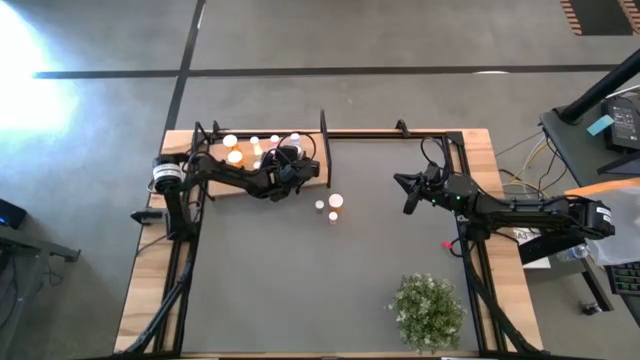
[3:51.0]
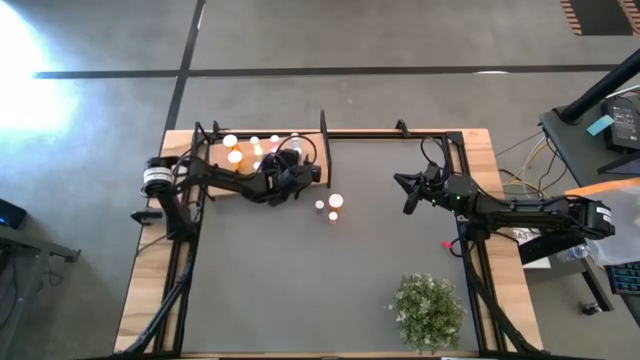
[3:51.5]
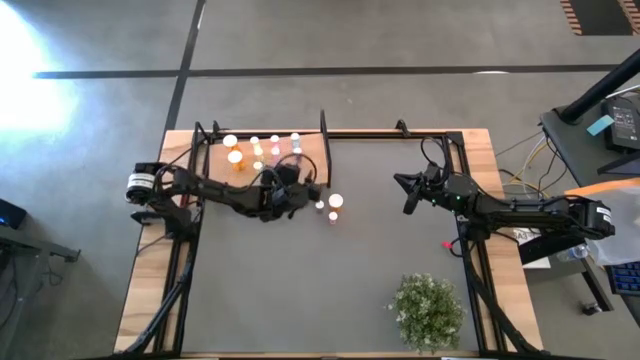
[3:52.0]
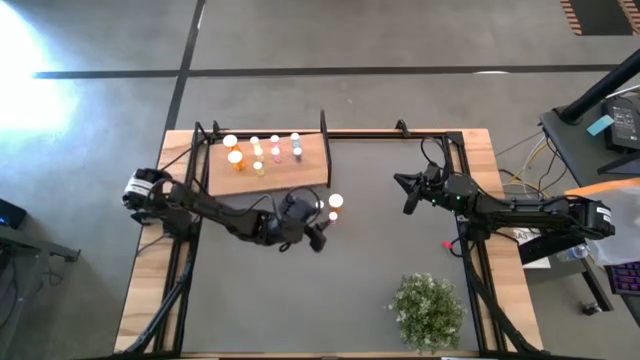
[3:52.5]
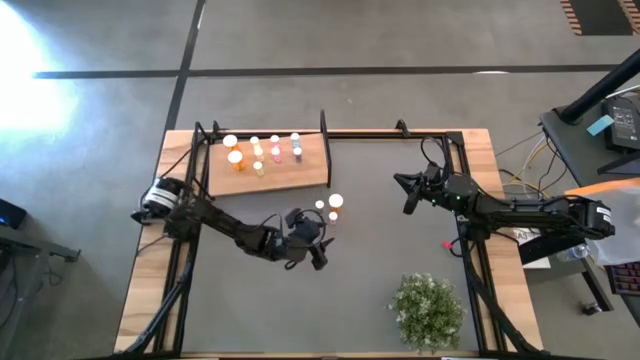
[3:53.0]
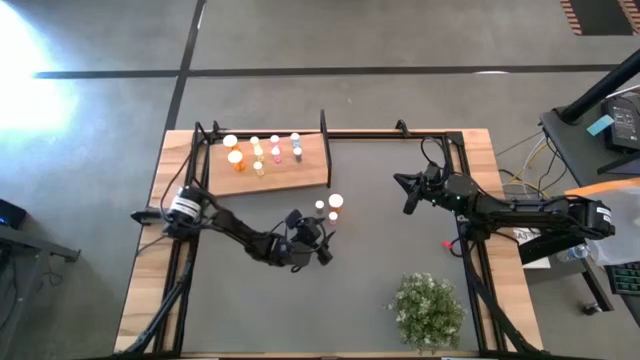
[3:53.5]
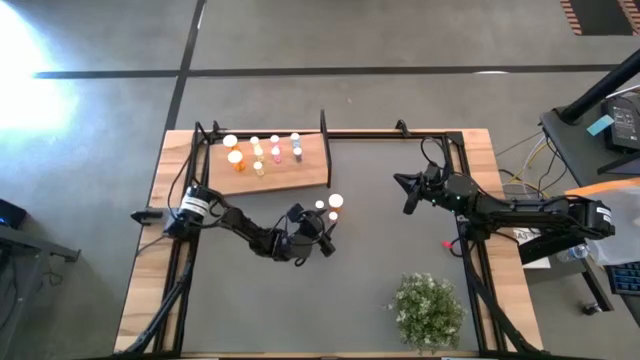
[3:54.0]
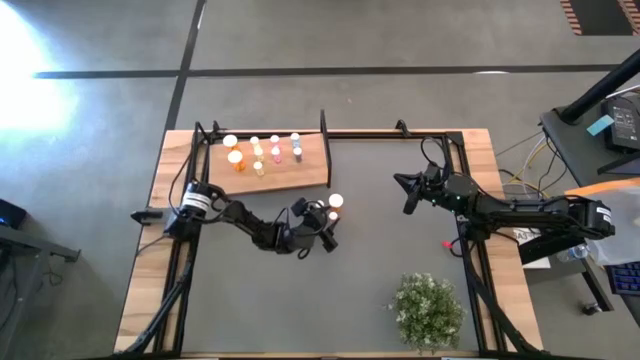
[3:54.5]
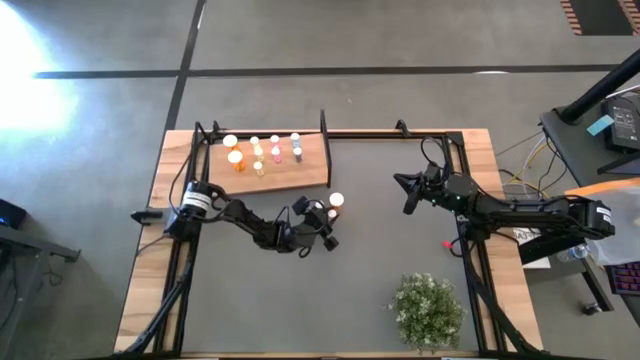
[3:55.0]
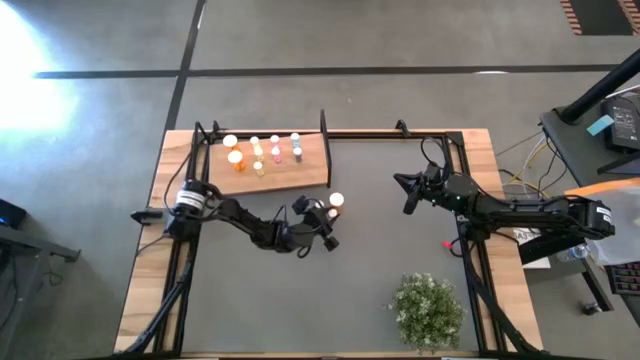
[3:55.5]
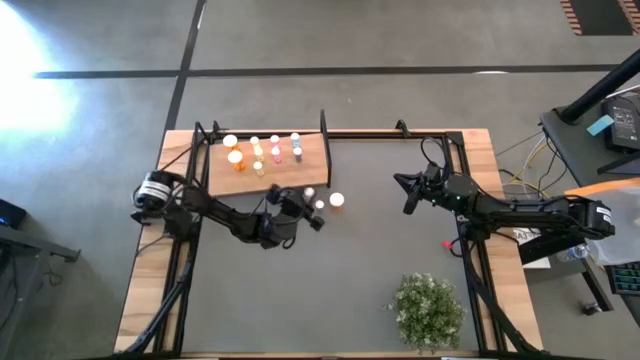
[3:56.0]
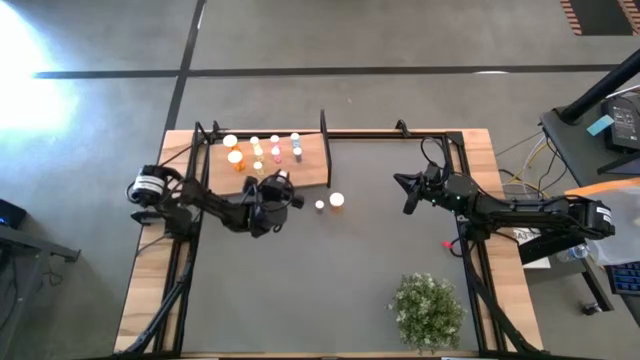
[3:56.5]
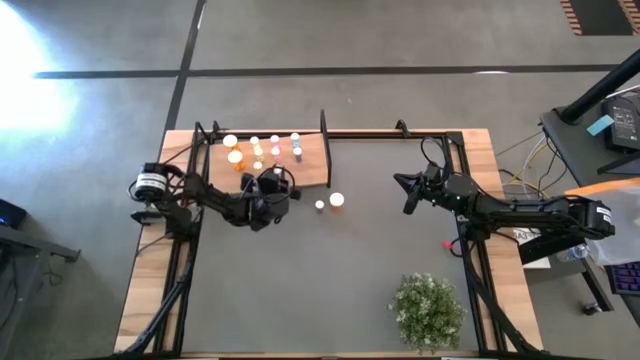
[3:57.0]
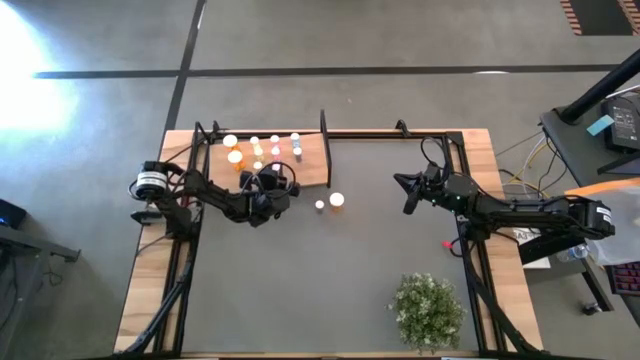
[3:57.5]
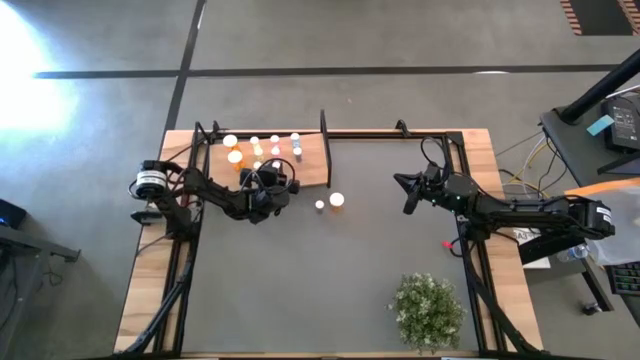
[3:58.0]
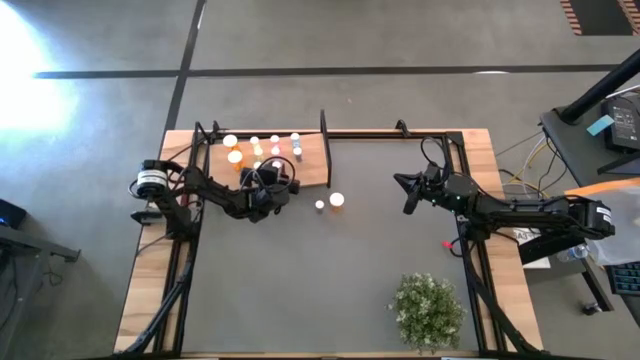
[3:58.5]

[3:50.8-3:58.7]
Task: Pick and place medicine bottles onto shelf by color
Put the pink pill bottle on the shelf aligned with the other pink pill bottle

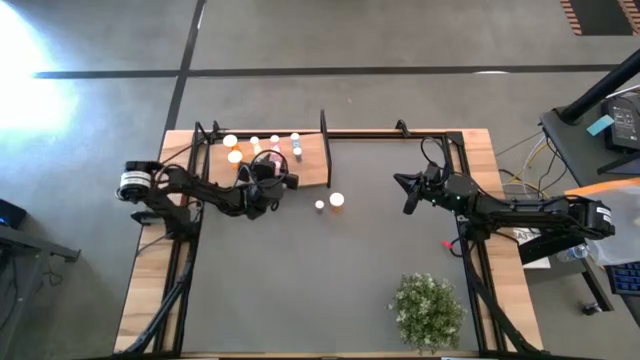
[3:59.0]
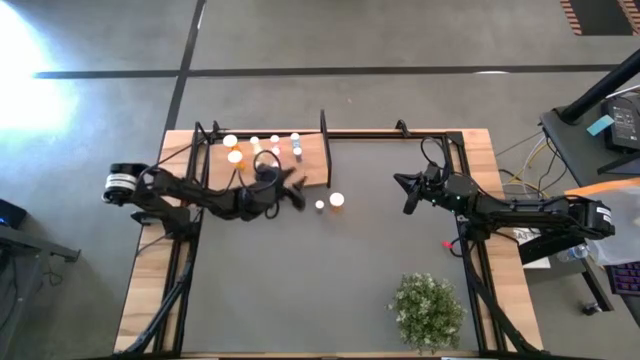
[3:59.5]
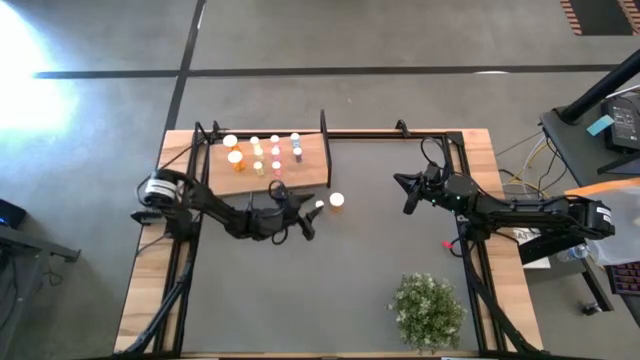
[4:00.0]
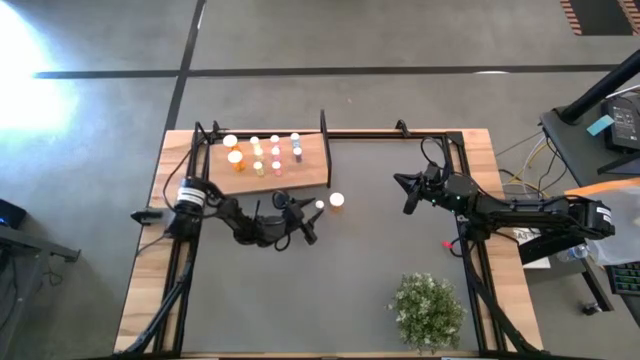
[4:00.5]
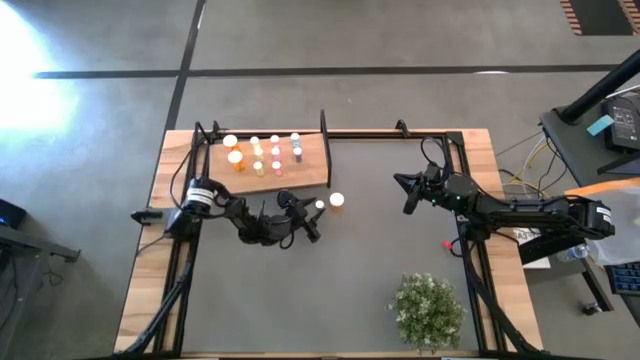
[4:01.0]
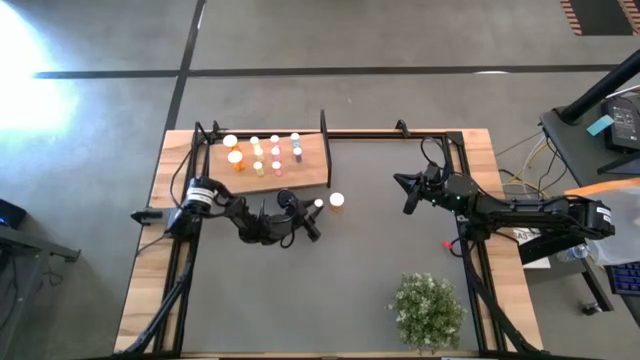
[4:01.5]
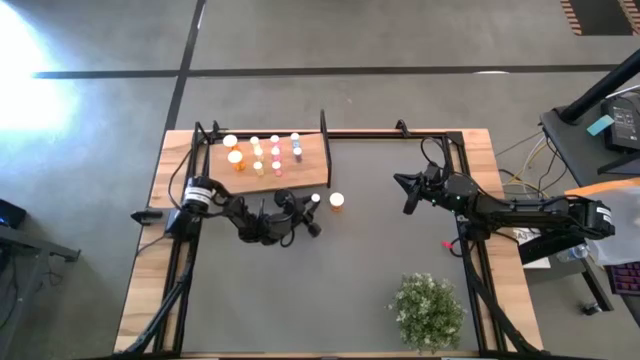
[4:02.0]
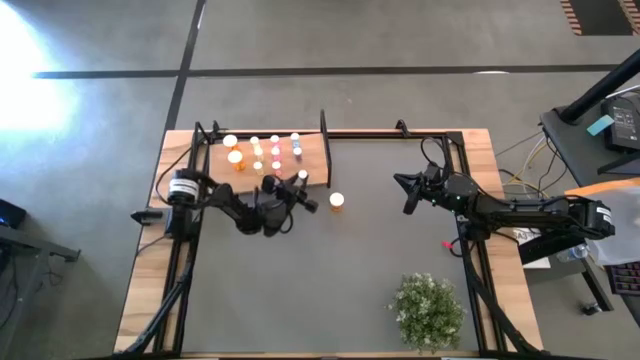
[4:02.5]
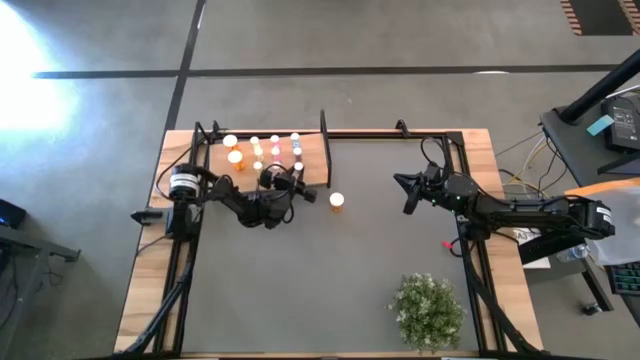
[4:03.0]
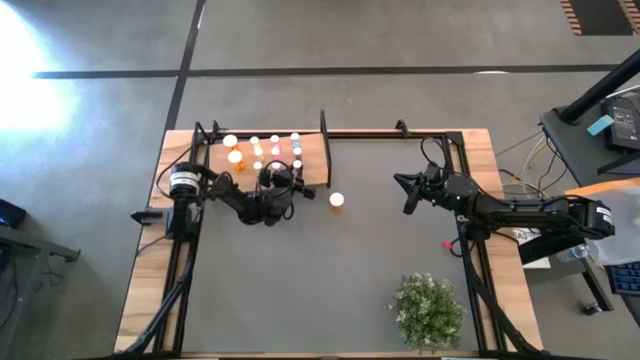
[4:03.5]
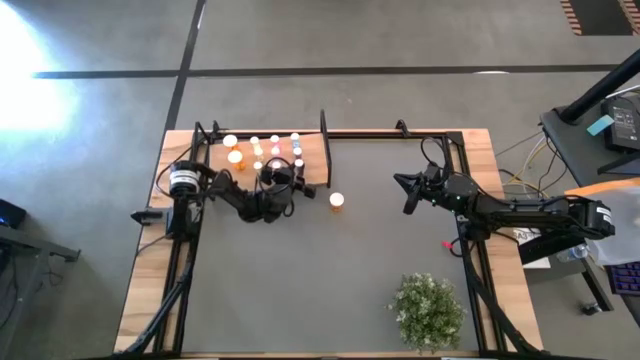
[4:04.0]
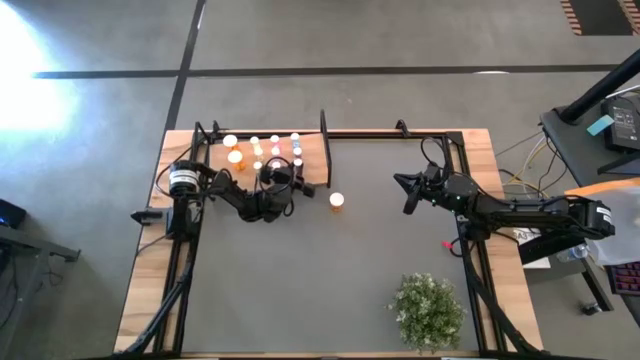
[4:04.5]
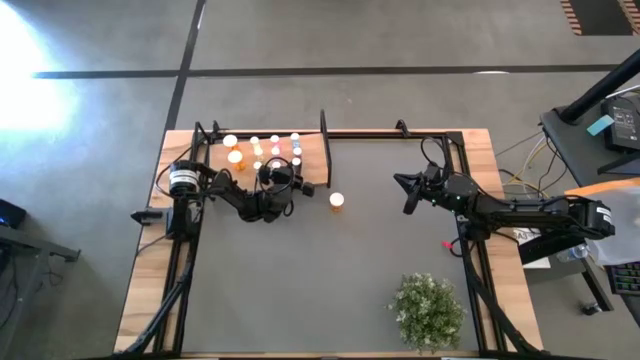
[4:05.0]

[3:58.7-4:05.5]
Put the blue pill bottle on the shelf aligned with the other blue pill bottle

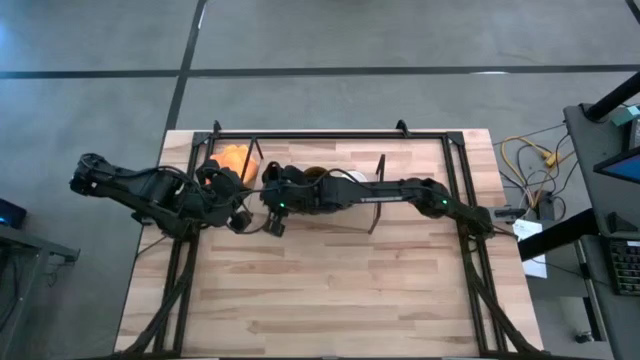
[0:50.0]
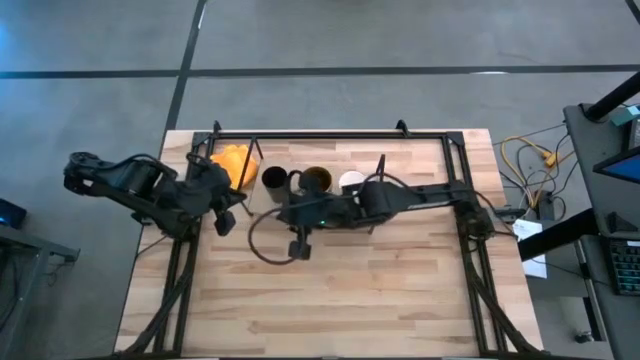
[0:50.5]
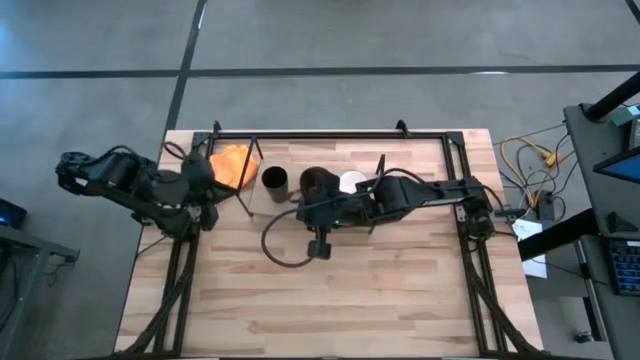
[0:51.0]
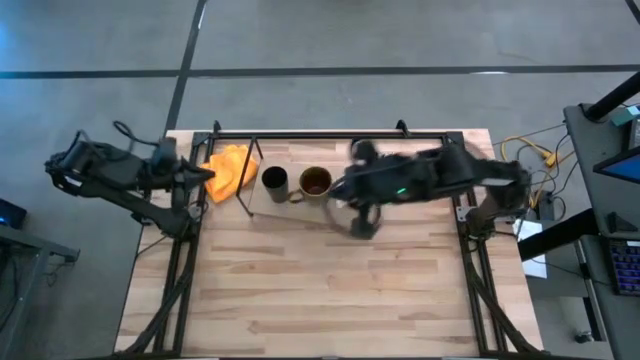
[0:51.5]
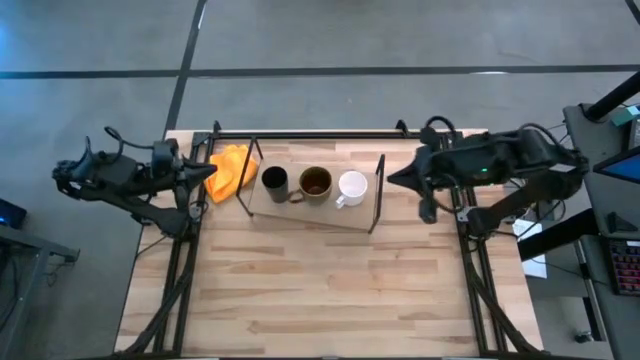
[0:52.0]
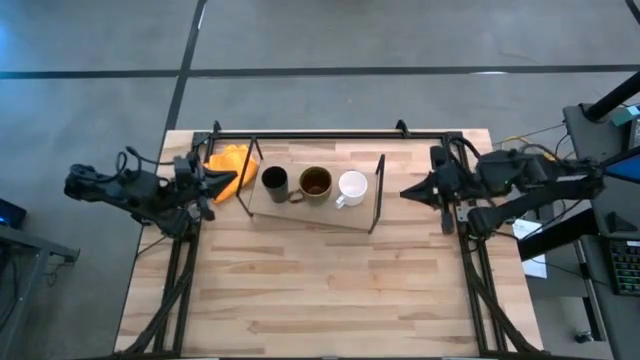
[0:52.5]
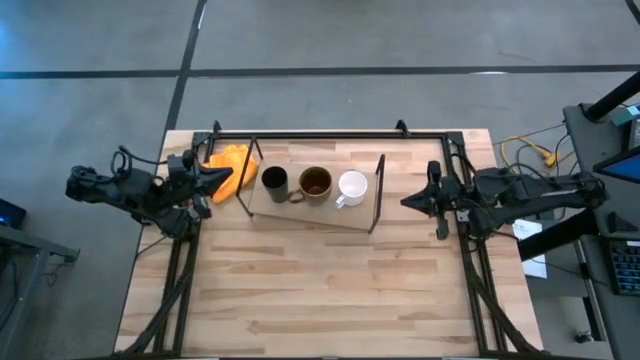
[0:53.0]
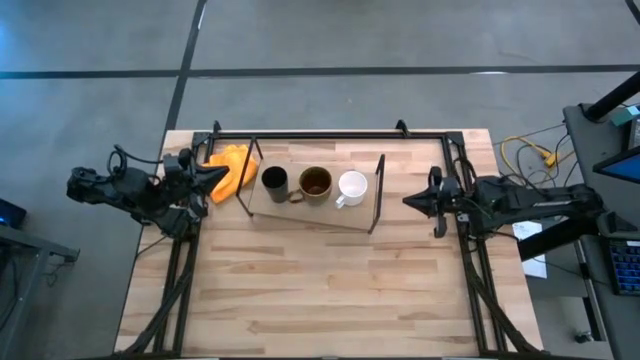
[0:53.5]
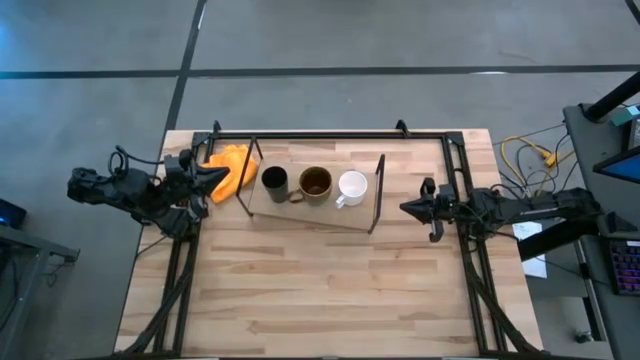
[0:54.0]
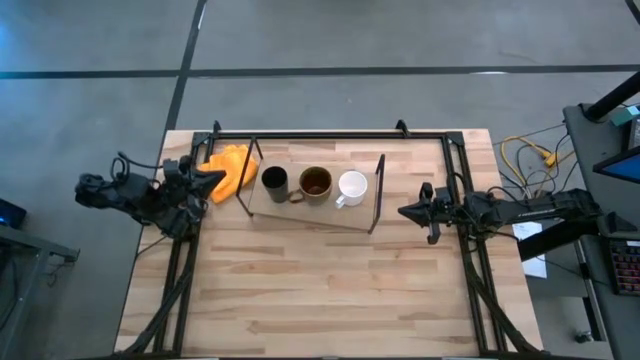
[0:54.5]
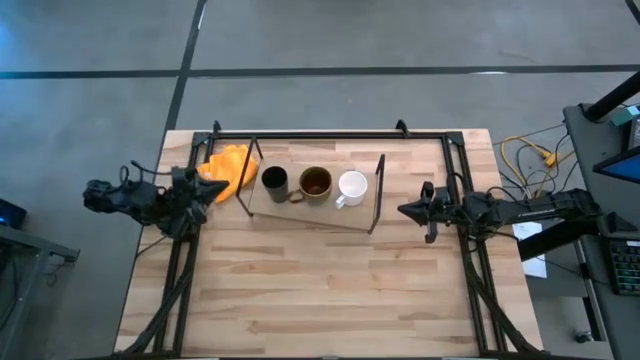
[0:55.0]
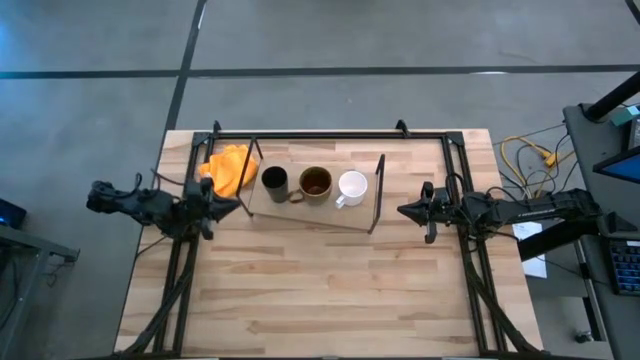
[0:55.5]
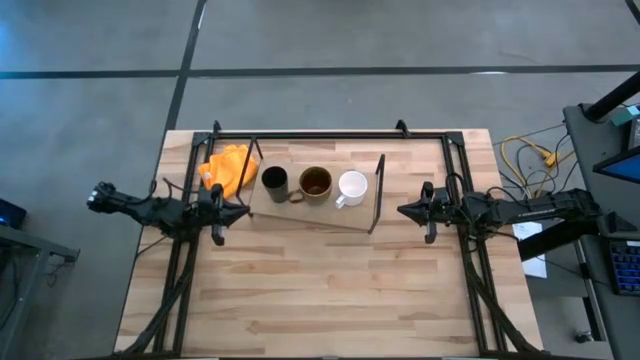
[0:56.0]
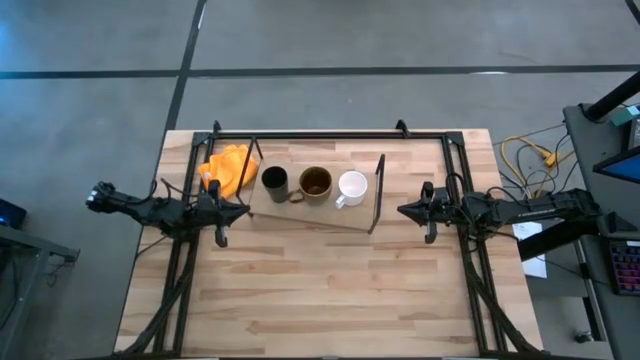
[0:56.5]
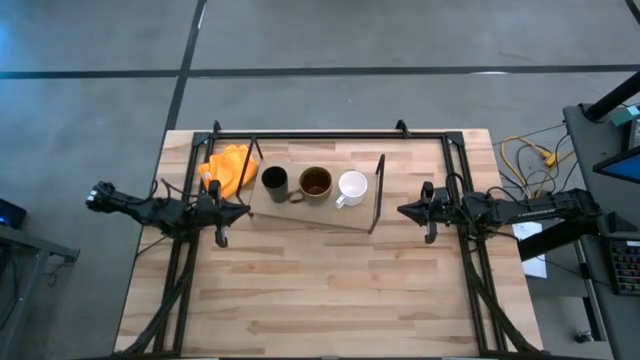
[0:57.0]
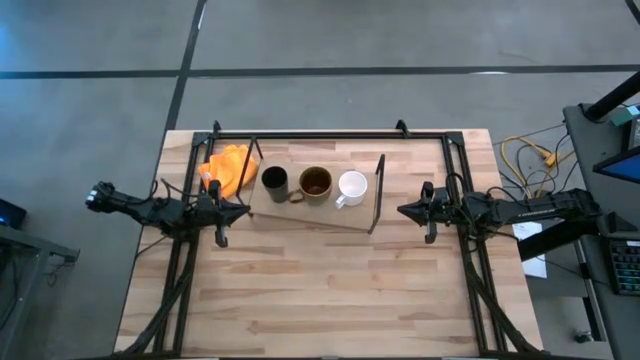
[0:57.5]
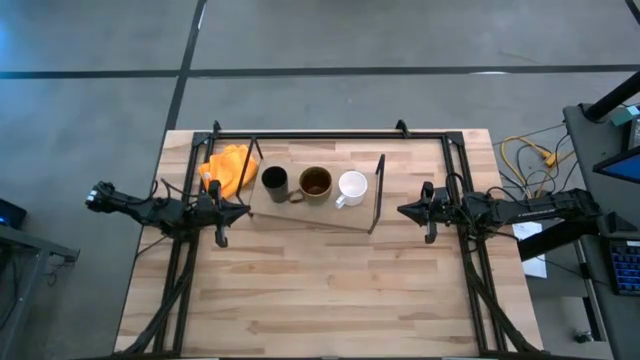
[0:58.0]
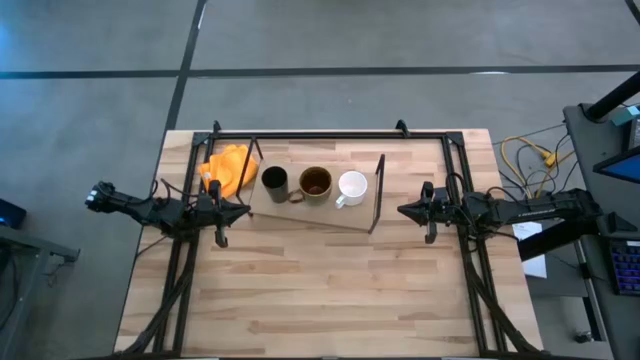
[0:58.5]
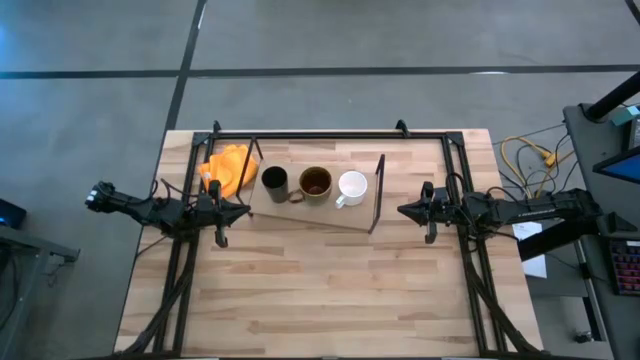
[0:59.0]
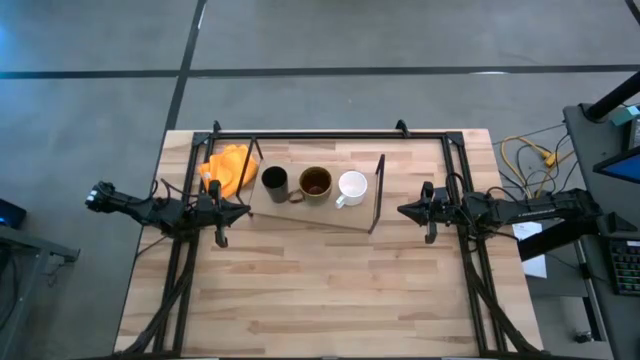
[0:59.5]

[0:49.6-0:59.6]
Task: Stack small to large cups/mugs on shelf
Return to Home Position
